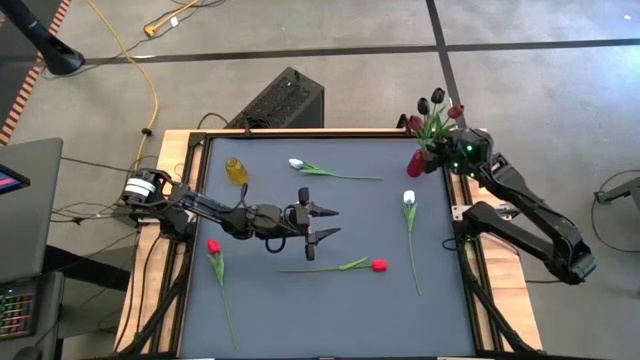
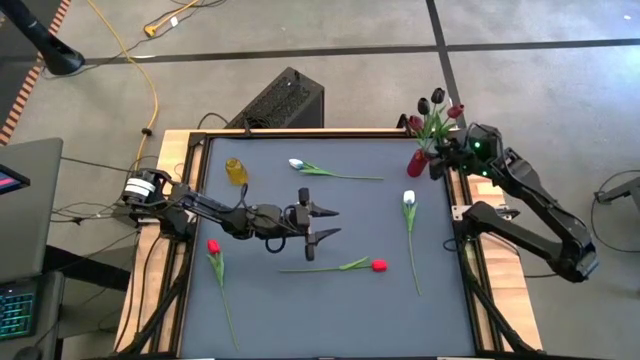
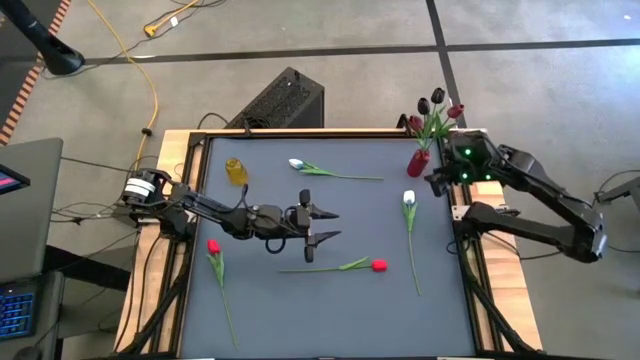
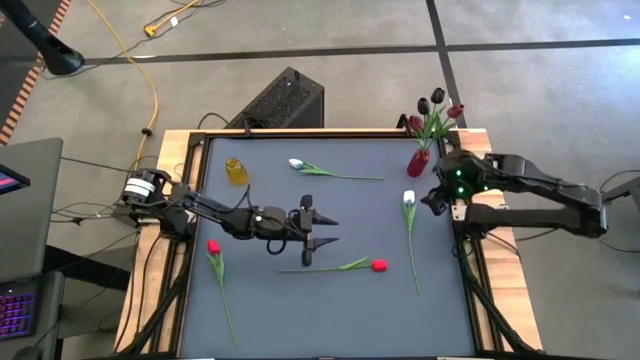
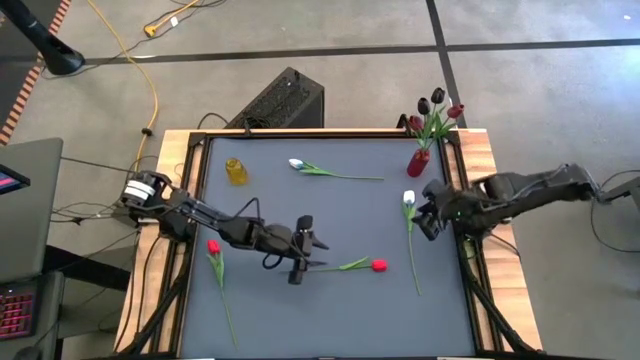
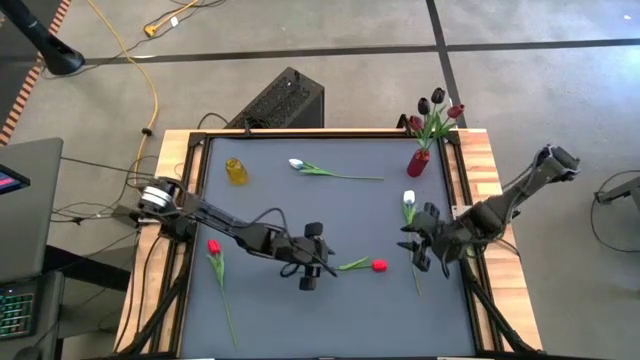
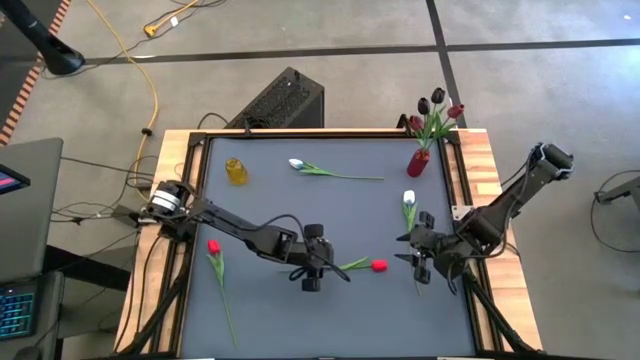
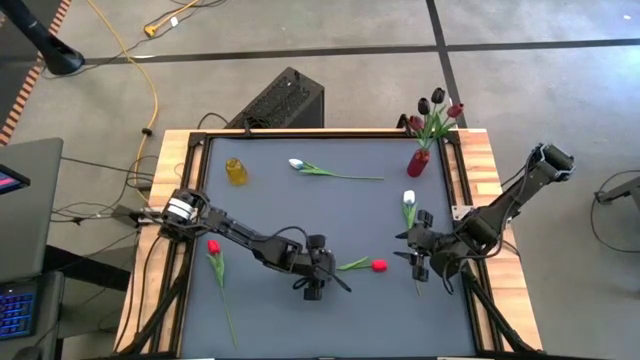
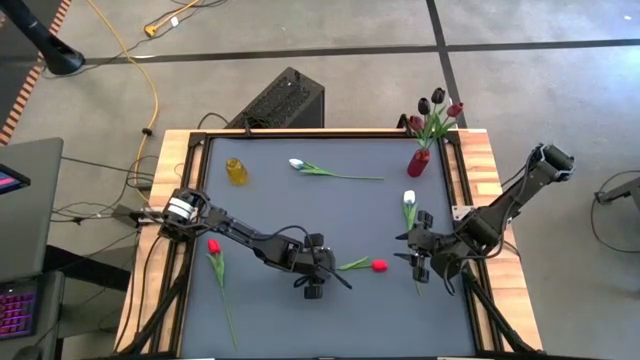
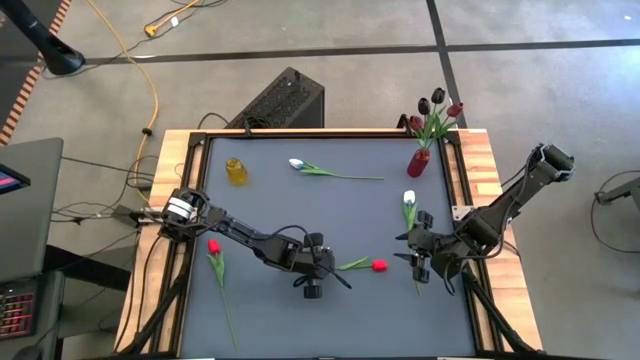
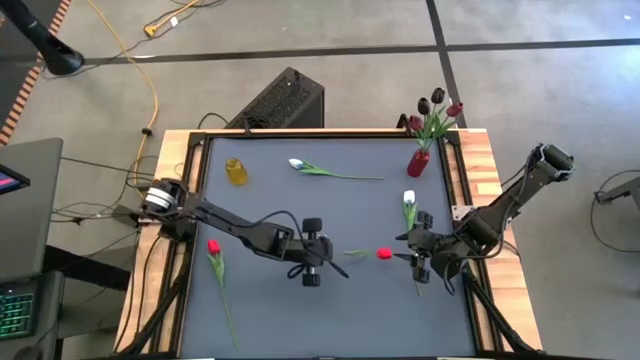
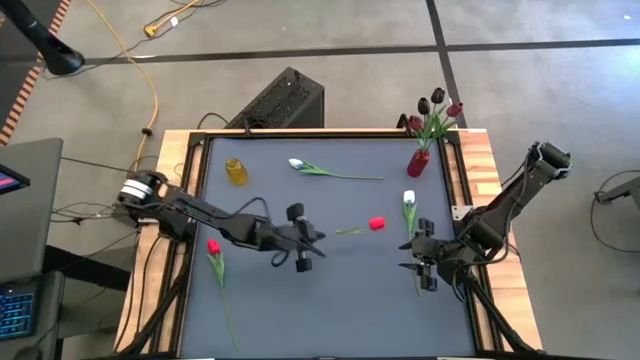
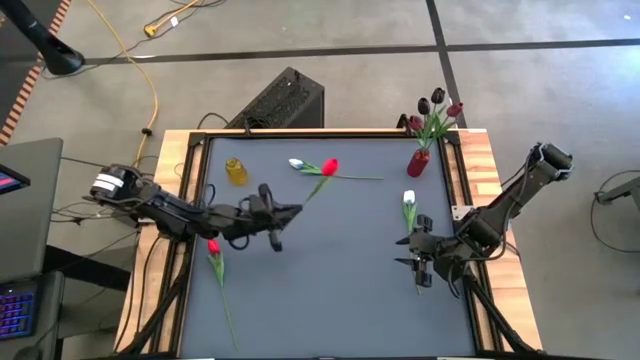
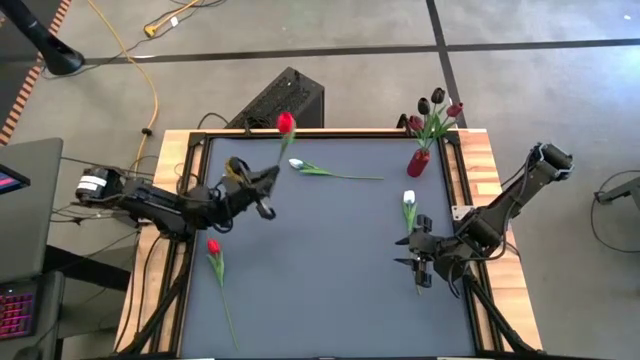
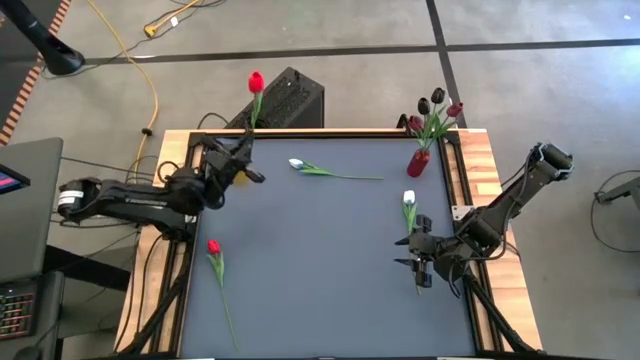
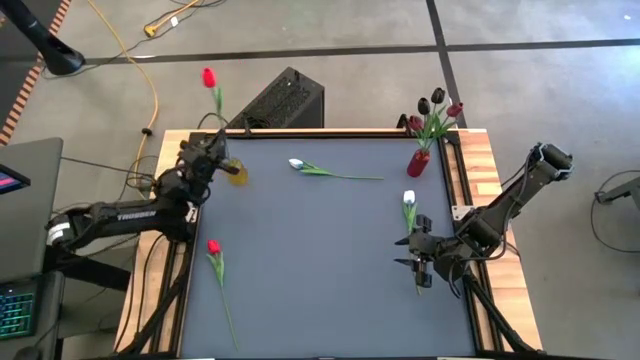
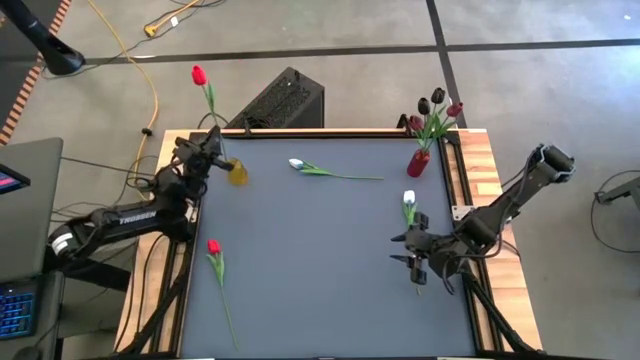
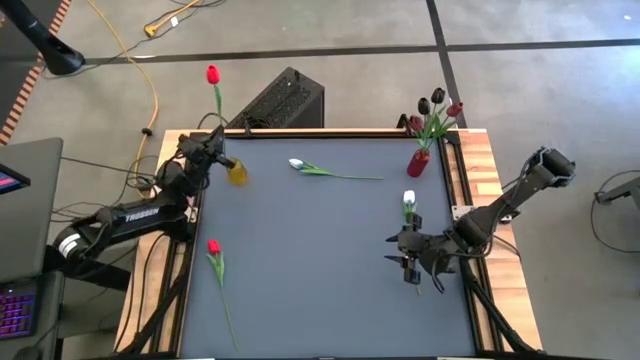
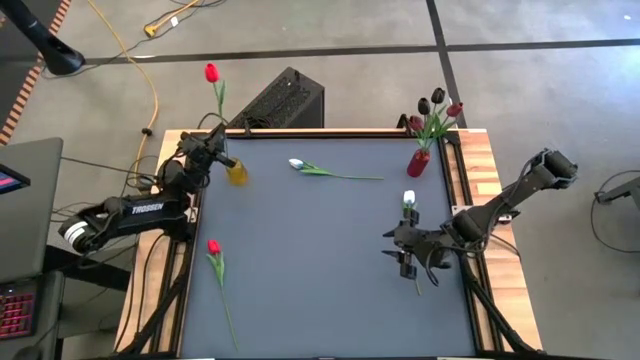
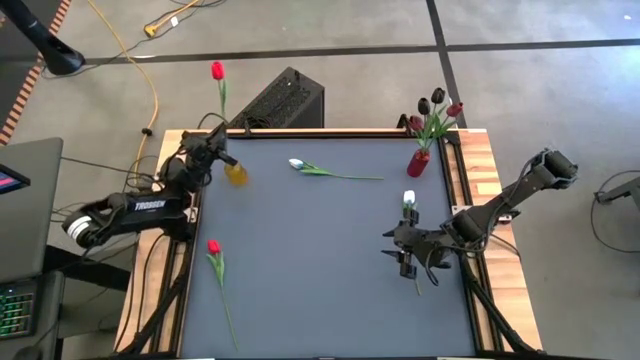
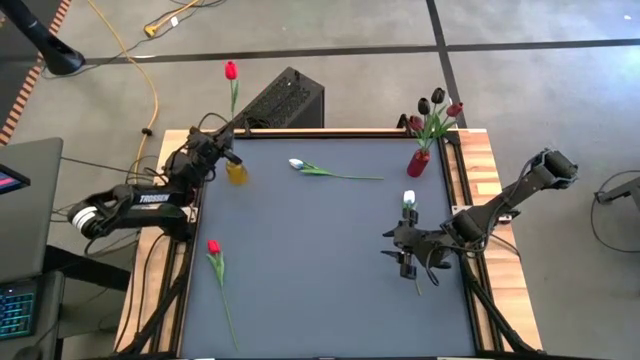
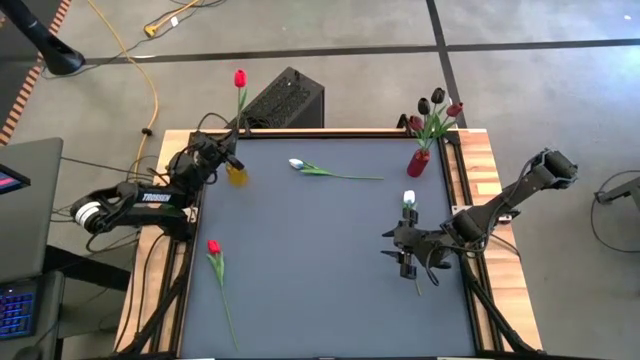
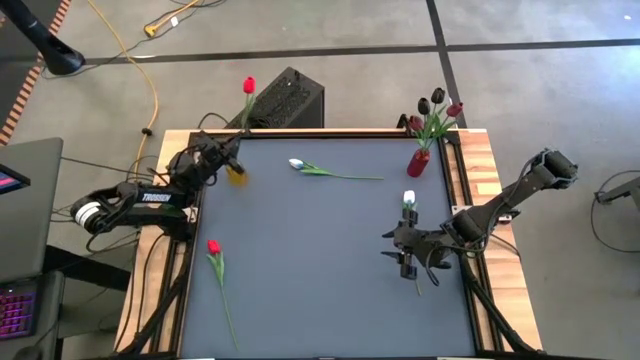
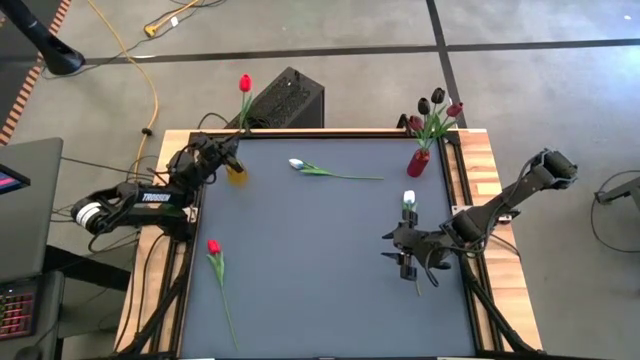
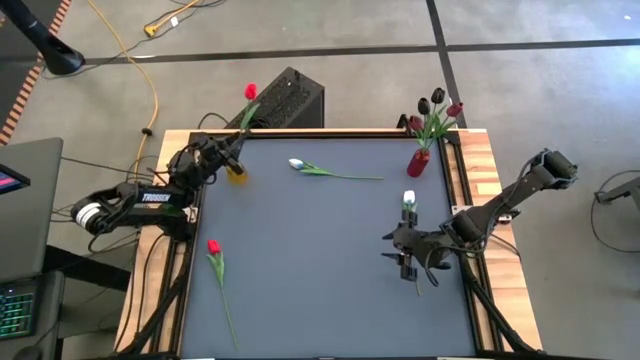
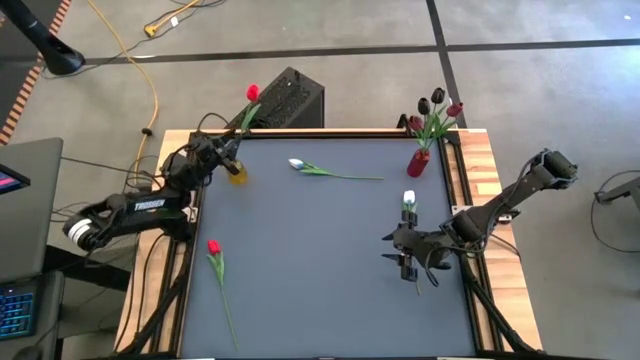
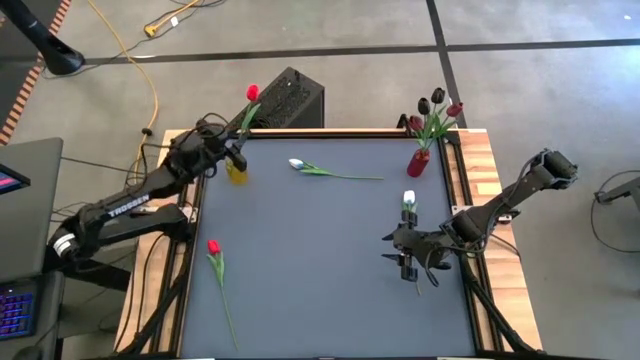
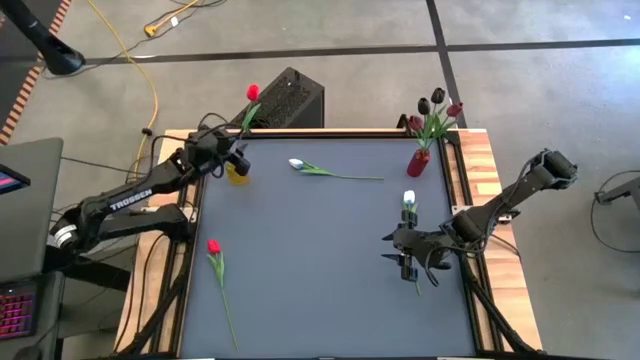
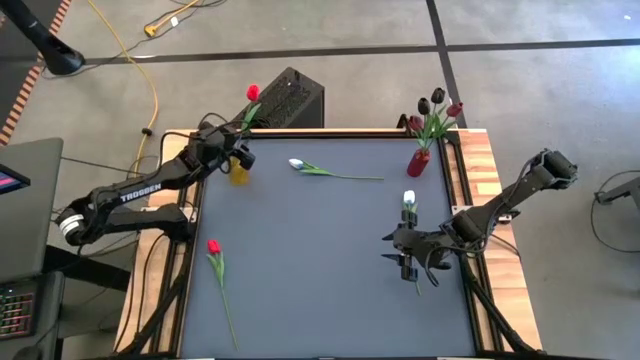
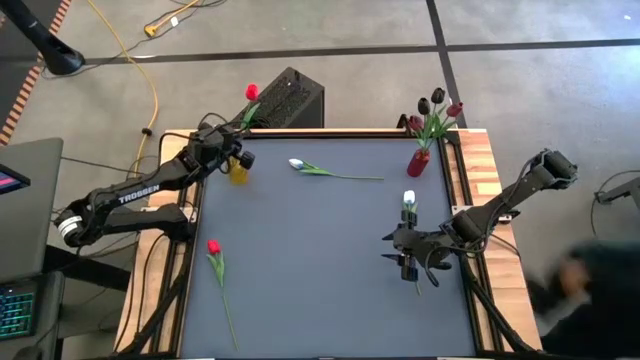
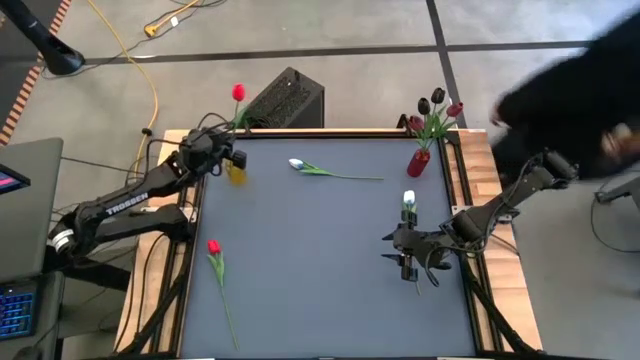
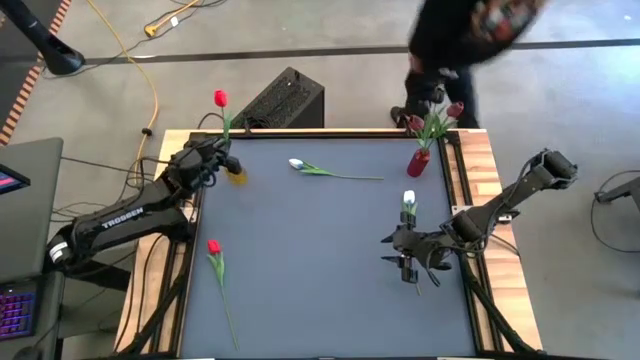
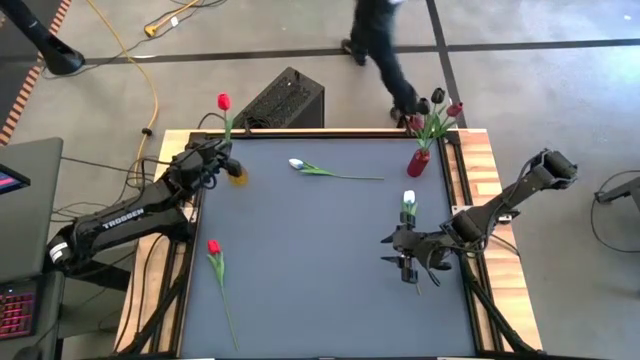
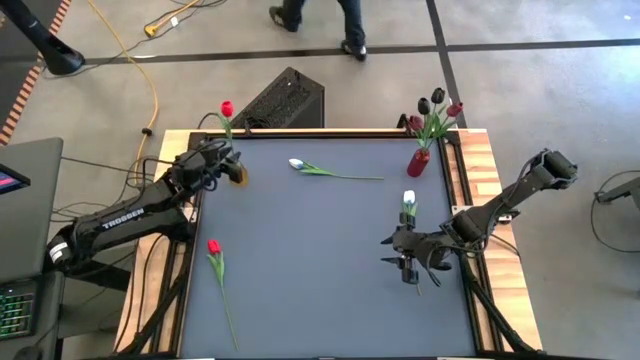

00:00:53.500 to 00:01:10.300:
Task: Sort flowers into vase by color
Put the right red tulip into the yellow flower vase

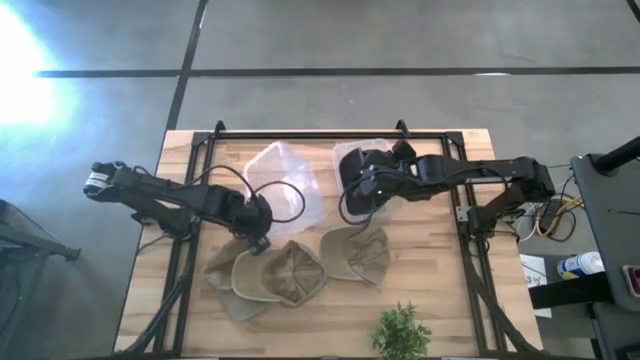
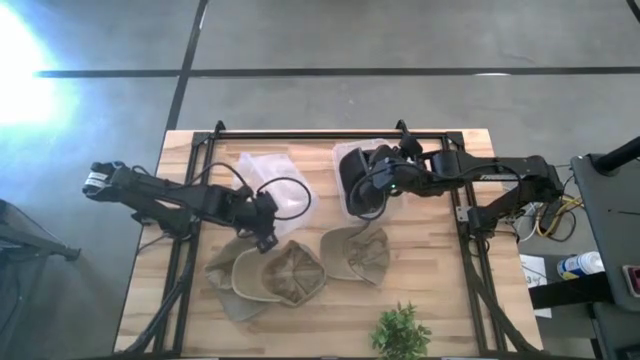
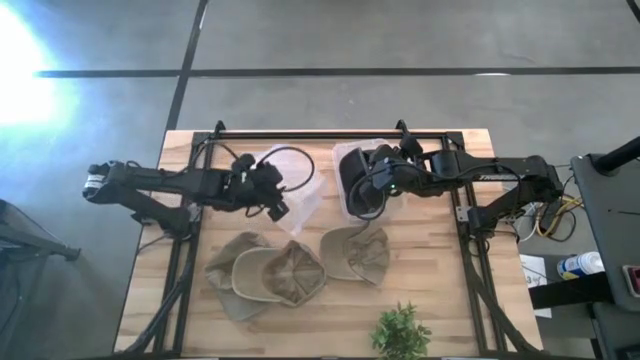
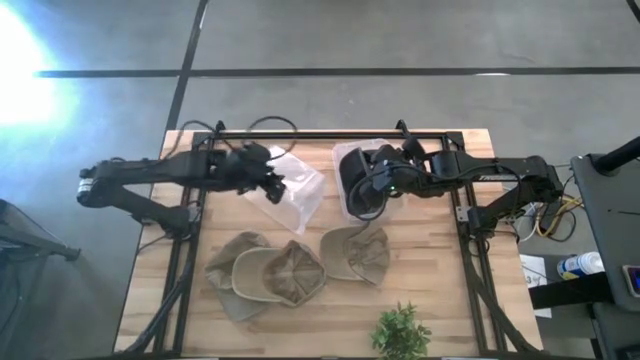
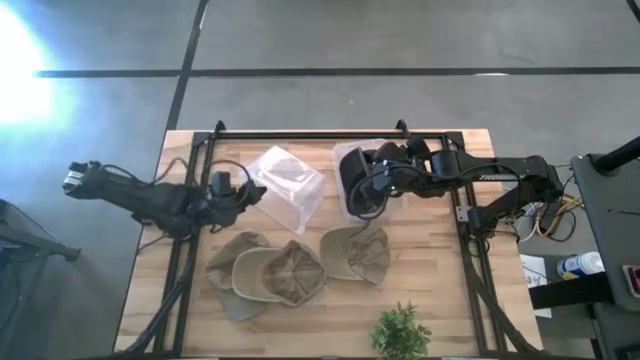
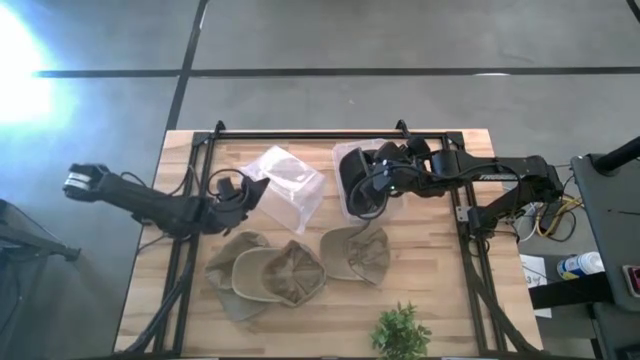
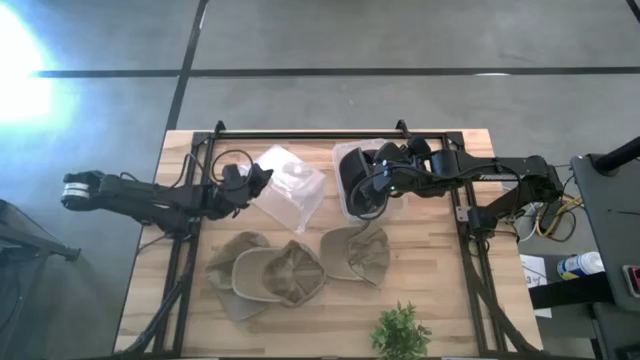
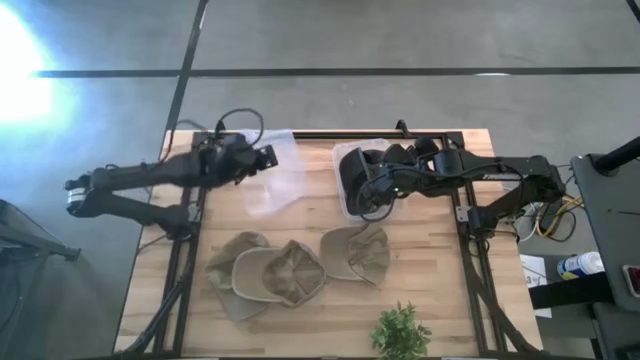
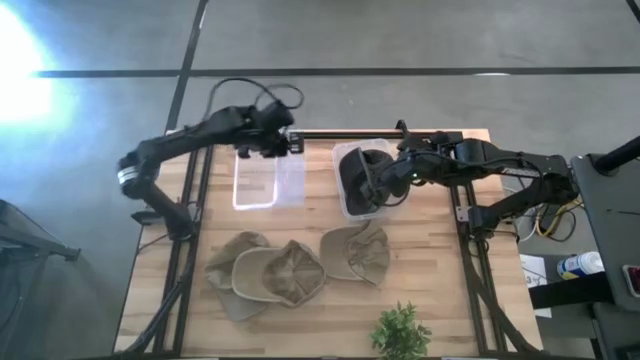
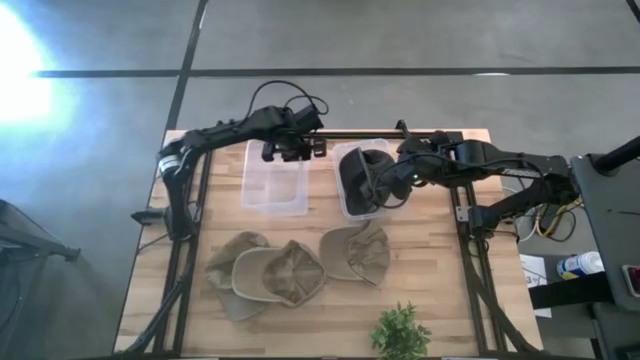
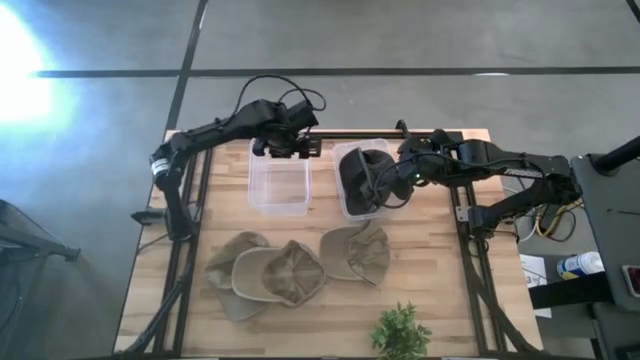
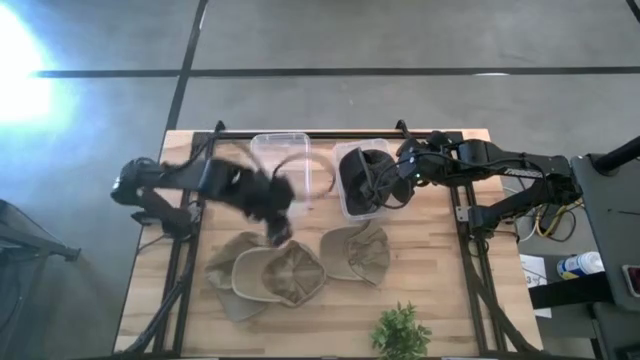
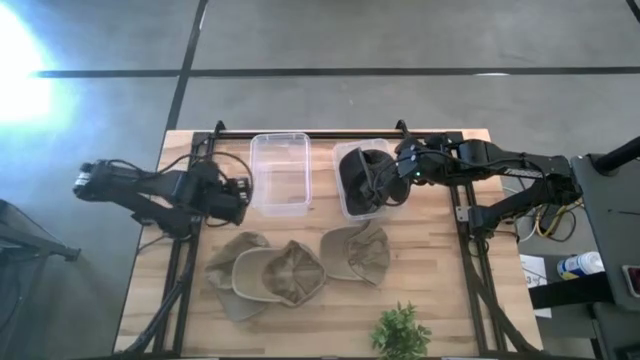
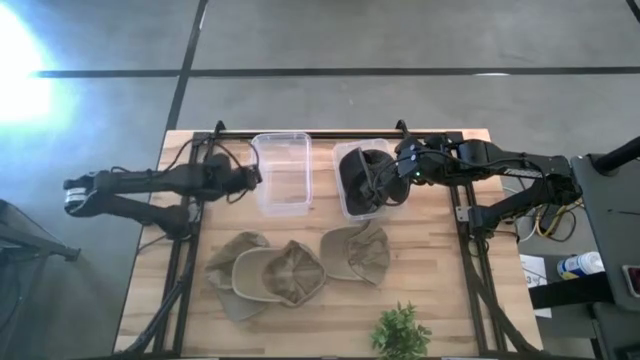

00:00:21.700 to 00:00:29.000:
Task: Pick & Place hat
Adjust the left transparent bin
